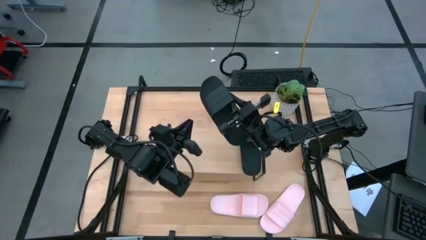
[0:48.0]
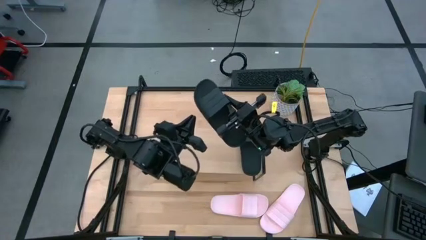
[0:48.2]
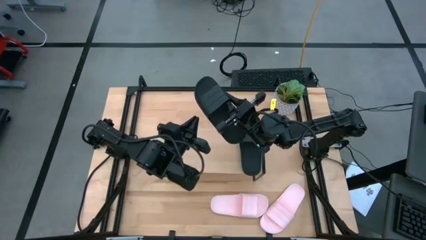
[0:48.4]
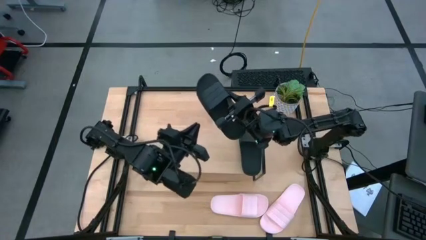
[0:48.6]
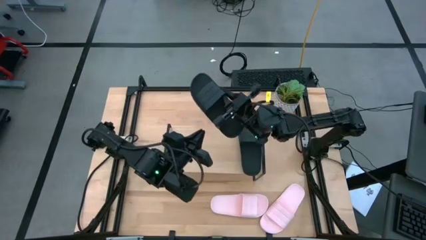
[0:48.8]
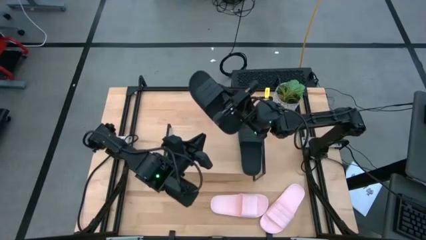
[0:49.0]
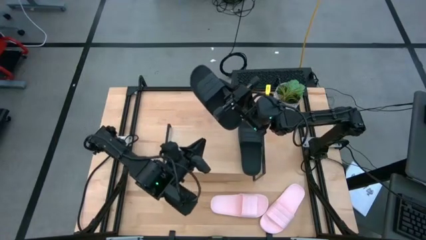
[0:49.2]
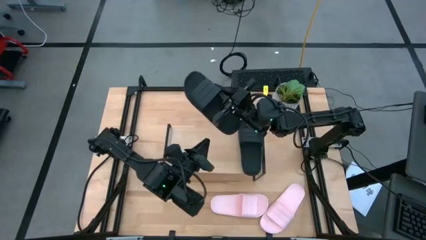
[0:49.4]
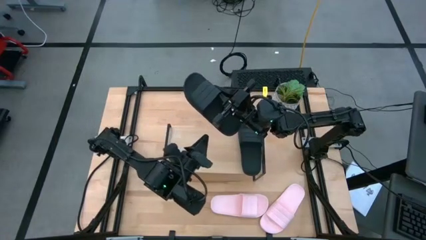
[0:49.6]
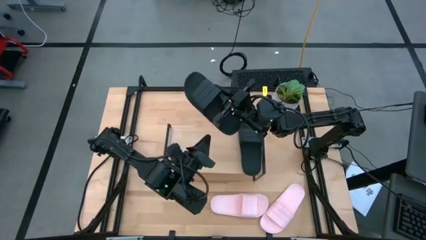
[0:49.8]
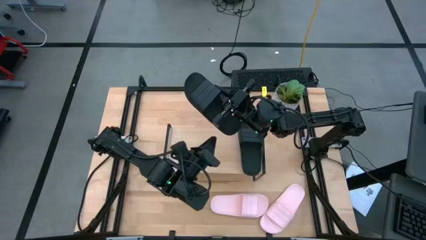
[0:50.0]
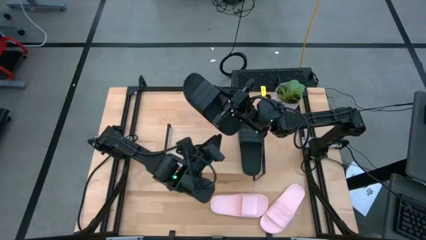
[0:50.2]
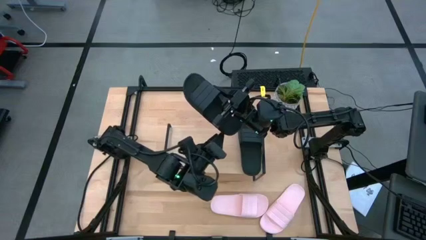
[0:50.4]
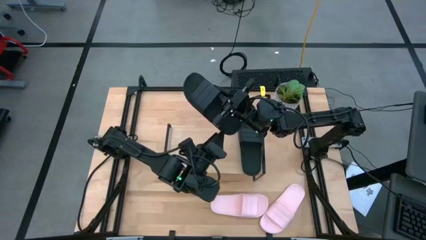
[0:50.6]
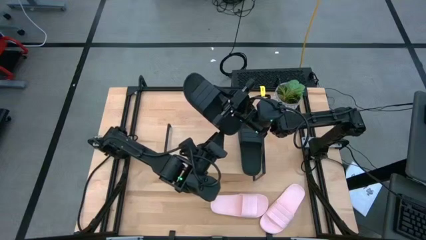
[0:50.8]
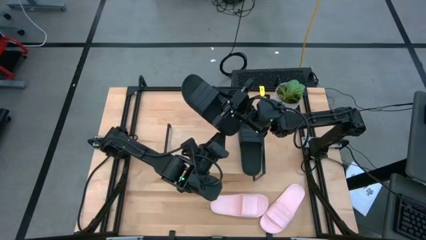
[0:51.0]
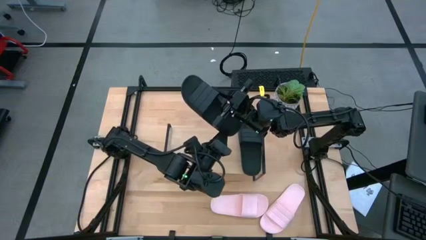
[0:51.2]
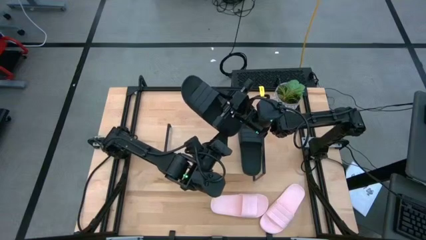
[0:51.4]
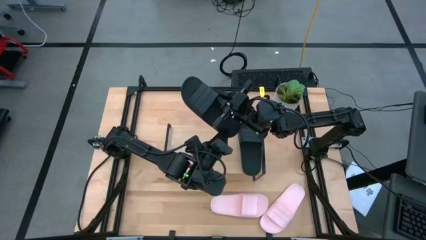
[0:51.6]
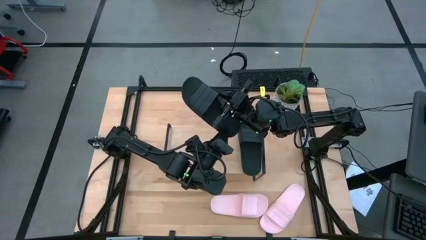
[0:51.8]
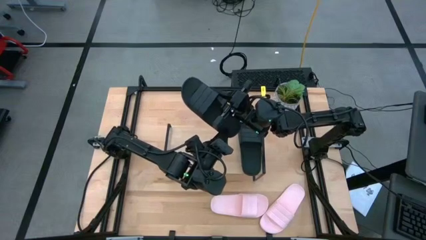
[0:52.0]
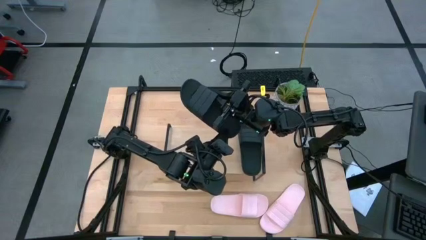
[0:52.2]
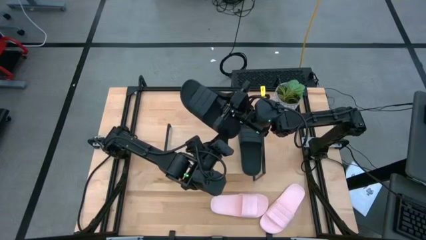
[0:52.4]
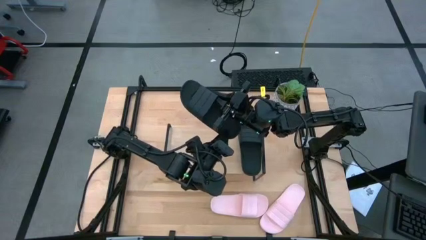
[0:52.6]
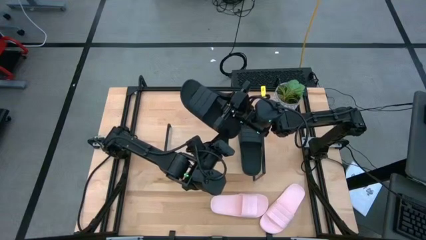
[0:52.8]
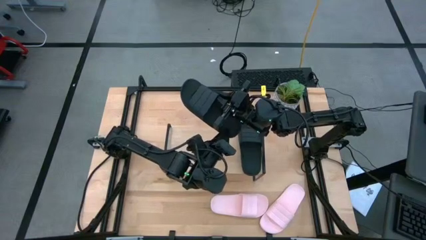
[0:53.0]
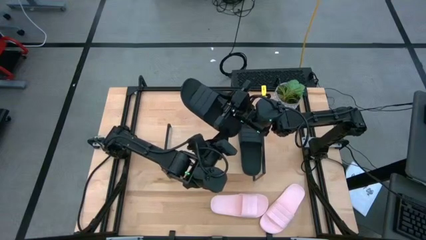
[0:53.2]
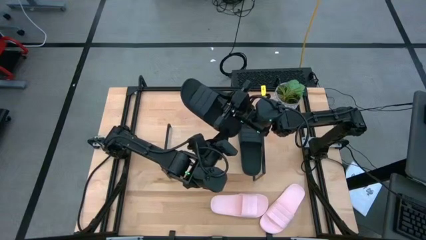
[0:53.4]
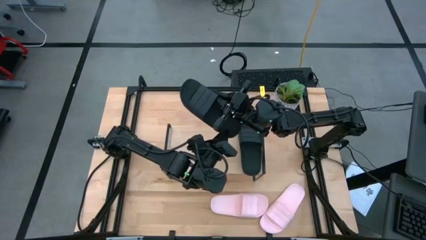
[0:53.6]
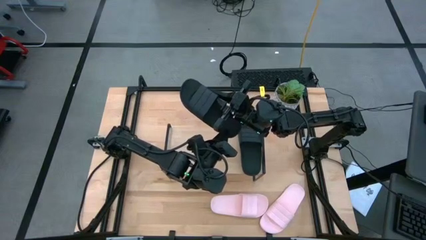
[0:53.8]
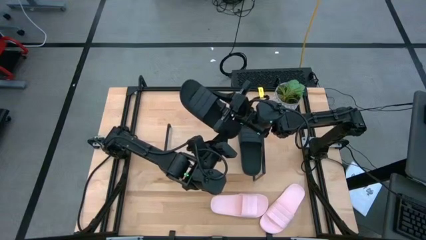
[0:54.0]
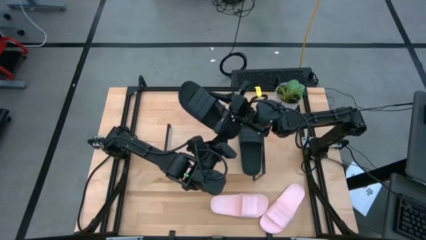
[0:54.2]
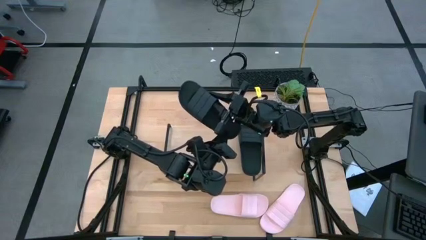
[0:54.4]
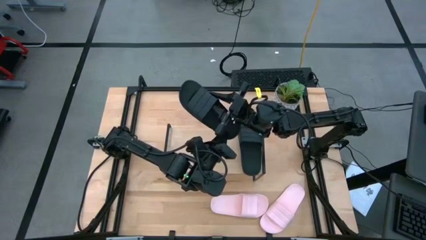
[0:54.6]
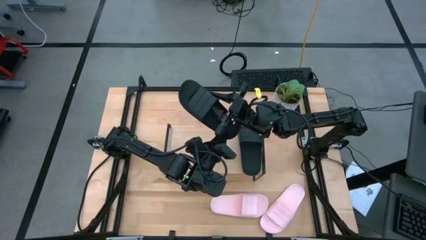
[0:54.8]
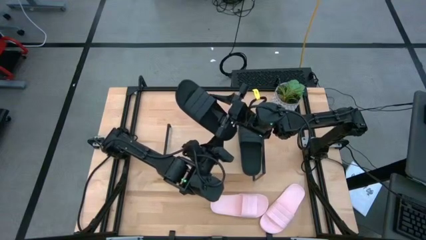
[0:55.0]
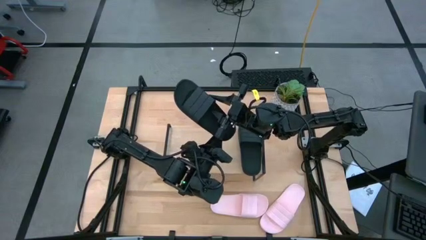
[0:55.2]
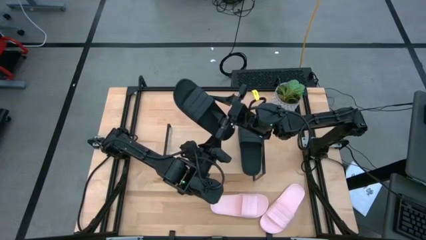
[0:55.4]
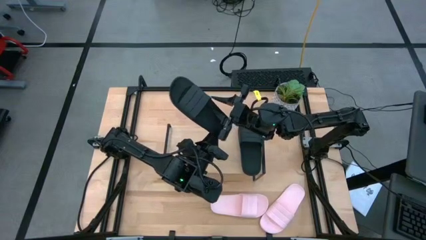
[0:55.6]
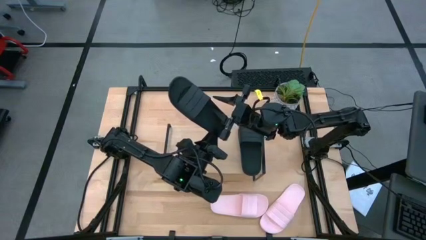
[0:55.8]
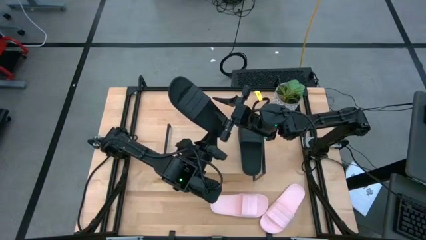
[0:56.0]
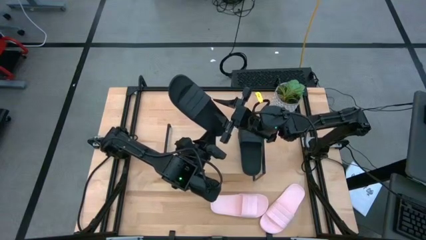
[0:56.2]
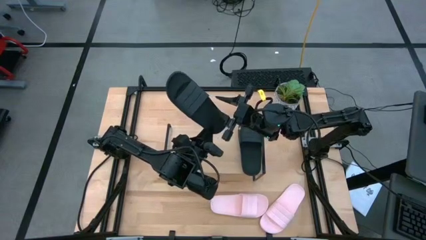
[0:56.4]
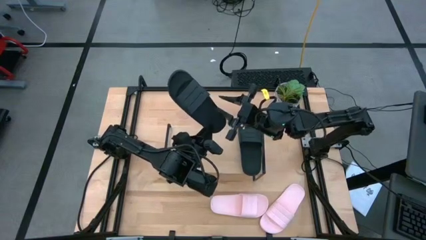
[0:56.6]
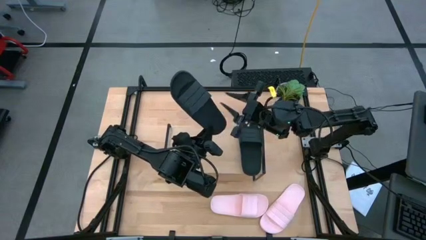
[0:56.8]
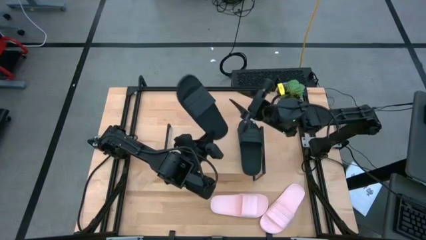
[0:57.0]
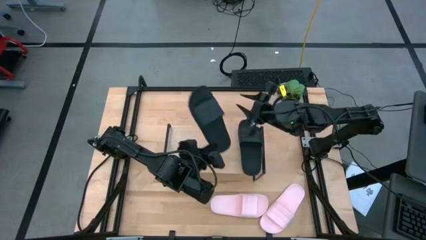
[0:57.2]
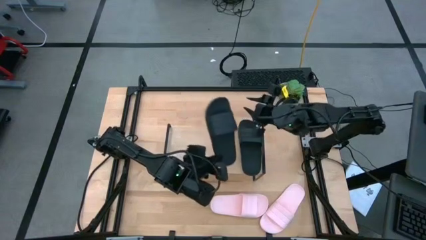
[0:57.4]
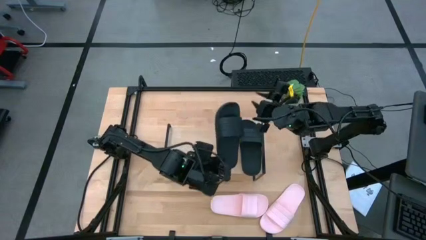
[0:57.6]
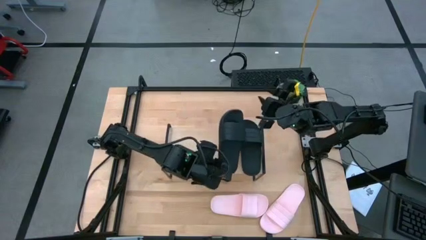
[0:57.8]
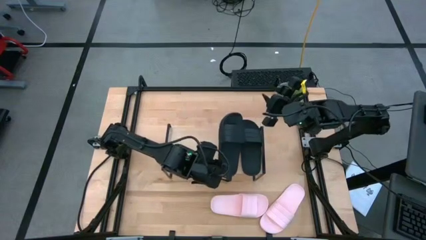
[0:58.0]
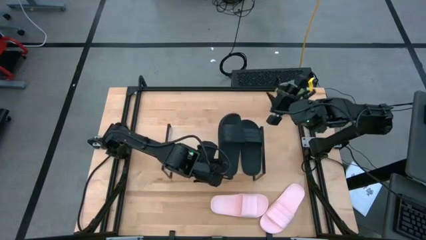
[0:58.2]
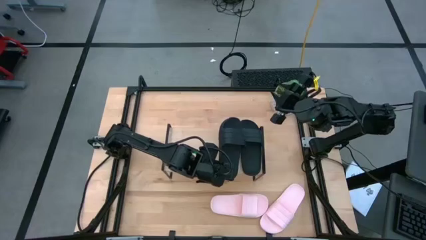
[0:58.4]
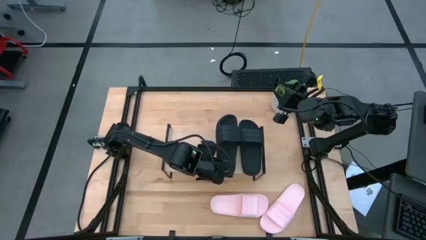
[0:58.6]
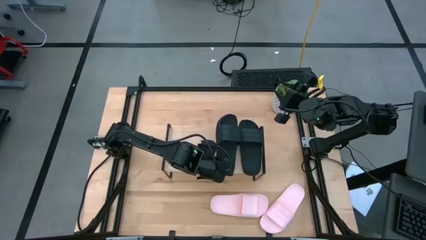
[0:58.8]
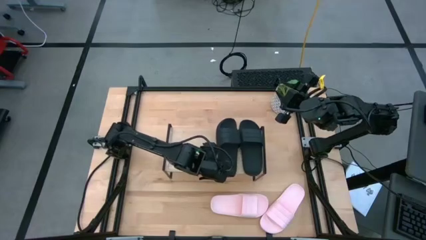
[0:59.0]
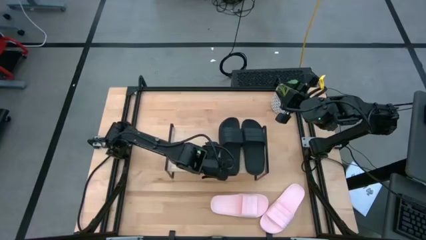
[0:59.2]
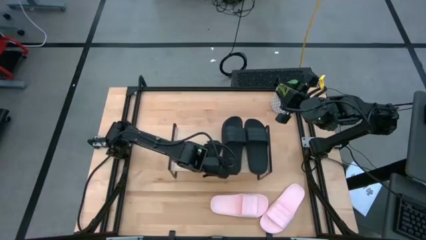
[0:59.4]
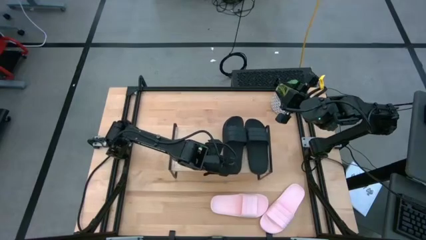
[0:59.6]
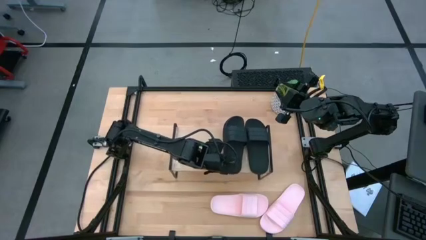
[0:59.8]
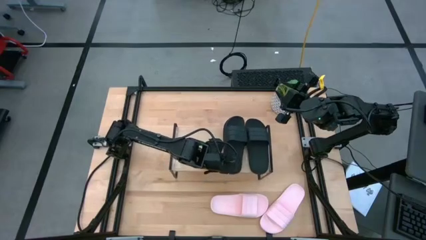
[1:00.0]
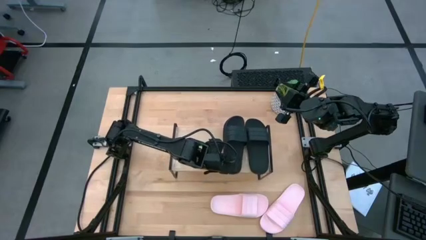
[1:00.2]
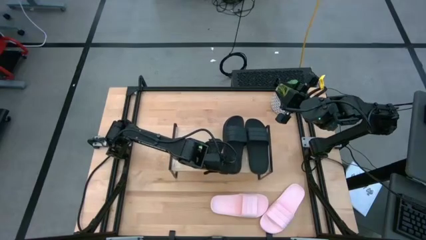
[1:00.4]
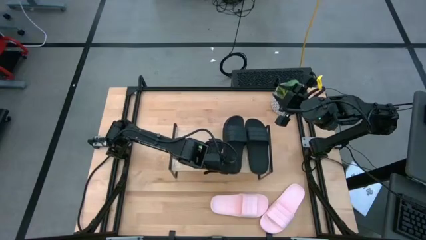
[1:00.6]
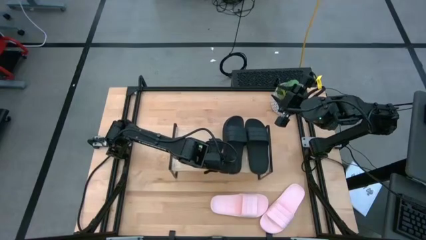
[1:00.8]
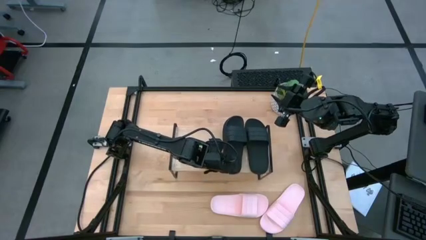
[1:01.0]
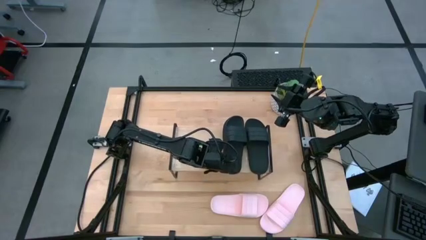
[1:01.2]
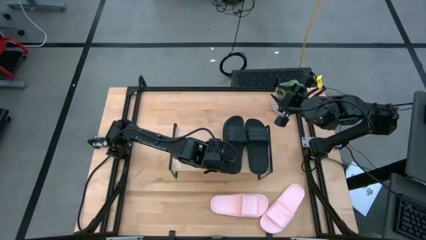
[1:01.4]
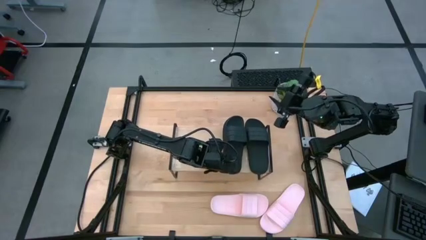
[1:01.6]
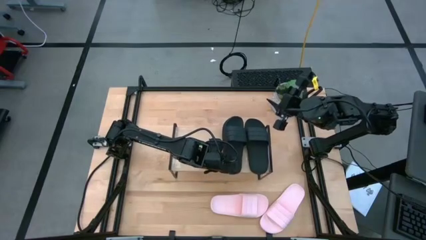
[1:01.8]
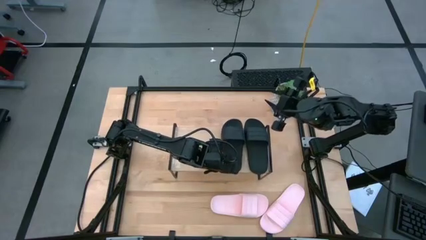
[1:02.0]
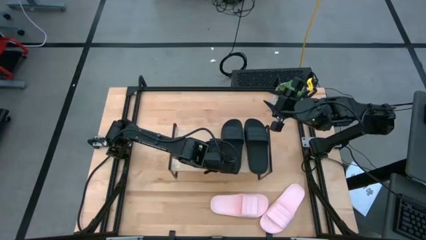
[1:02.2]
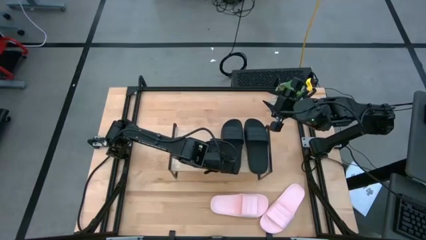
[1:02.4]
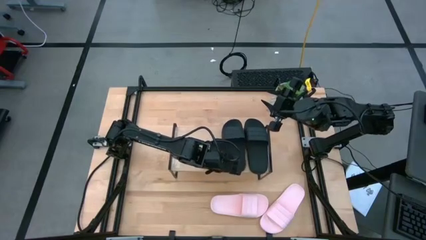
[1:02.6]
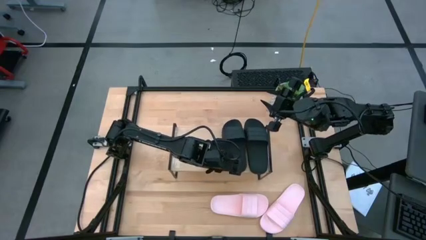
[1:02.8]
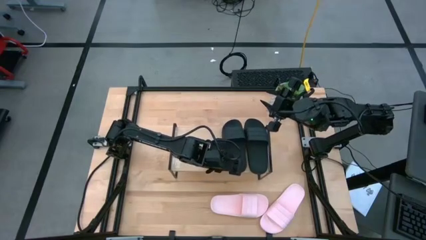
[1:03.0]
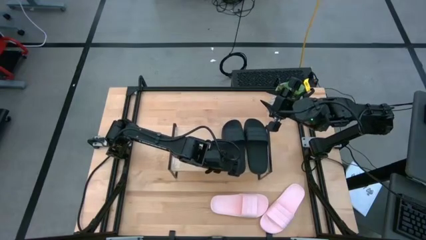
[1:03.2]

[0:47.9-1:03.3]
Task: Pick and place slides into the shelf
Put the black slipper on the shelf
